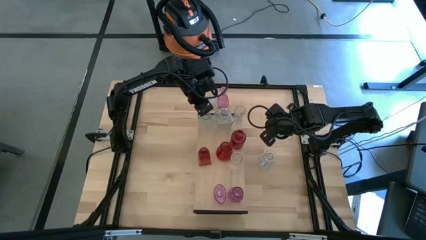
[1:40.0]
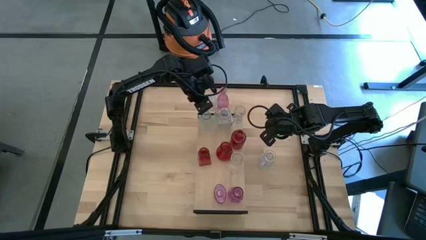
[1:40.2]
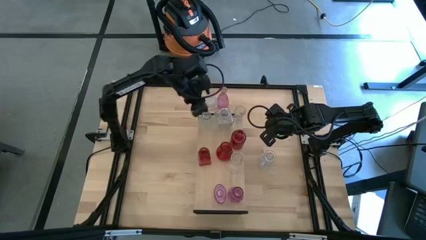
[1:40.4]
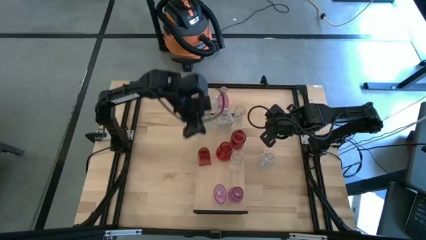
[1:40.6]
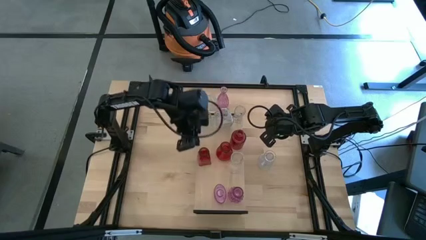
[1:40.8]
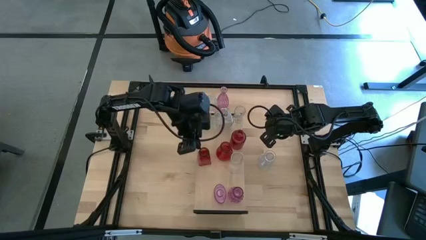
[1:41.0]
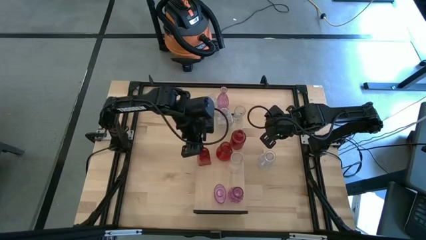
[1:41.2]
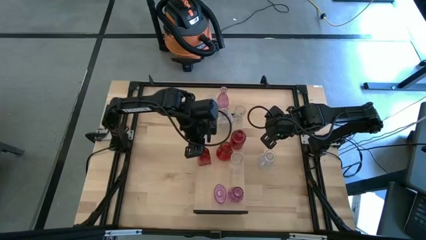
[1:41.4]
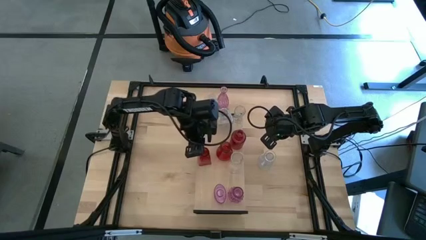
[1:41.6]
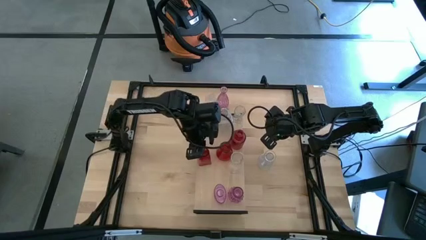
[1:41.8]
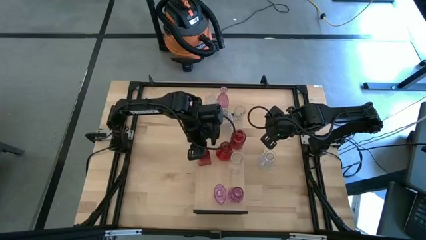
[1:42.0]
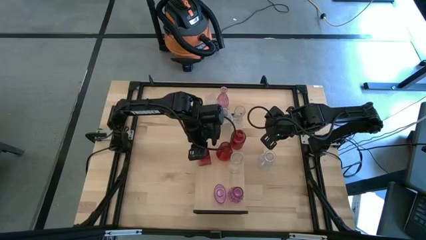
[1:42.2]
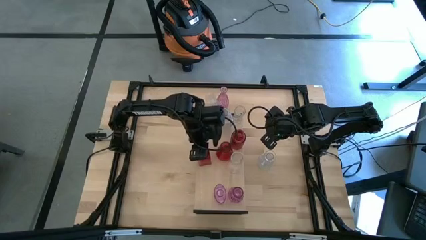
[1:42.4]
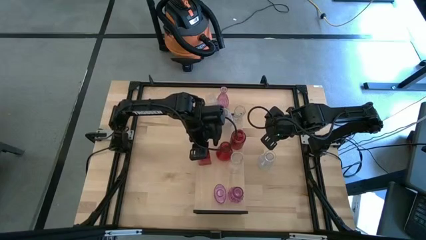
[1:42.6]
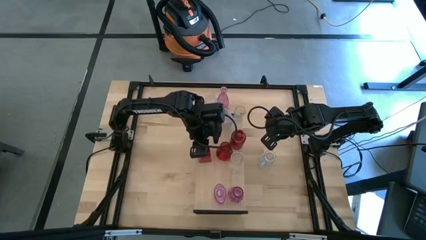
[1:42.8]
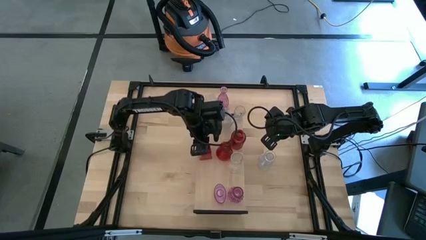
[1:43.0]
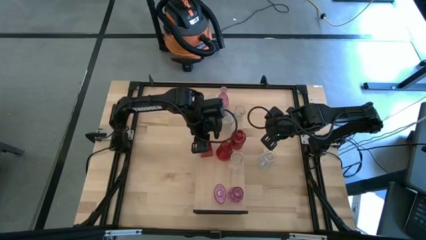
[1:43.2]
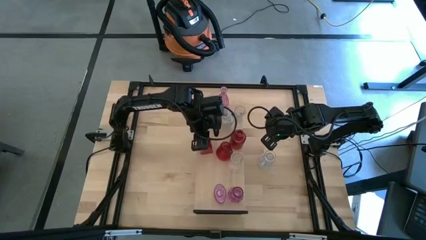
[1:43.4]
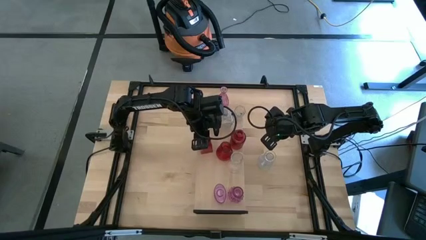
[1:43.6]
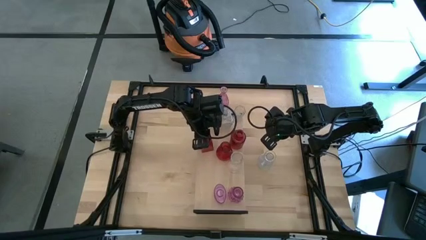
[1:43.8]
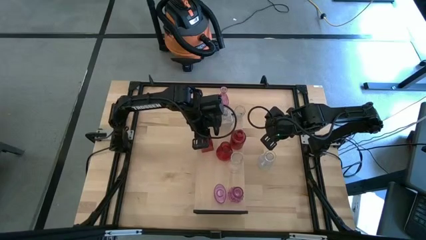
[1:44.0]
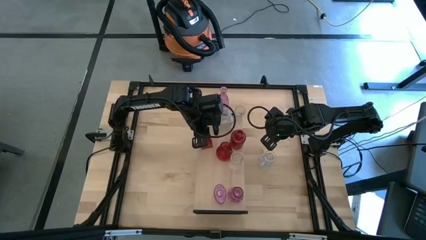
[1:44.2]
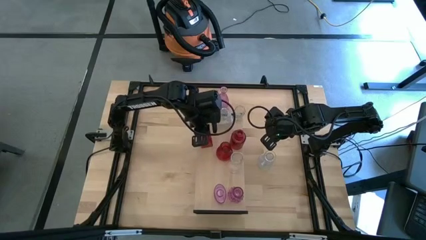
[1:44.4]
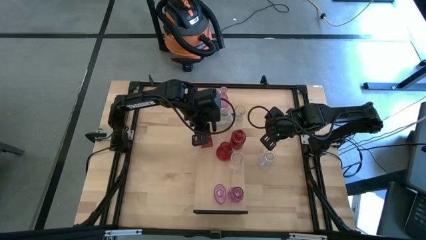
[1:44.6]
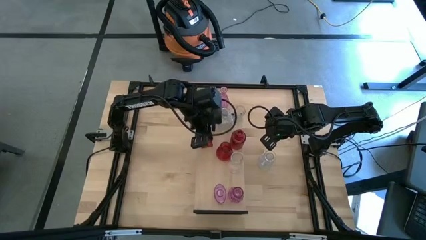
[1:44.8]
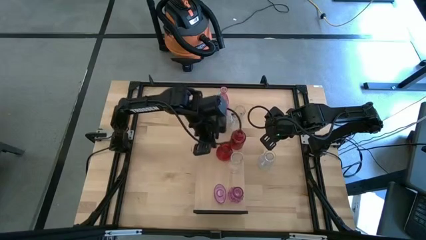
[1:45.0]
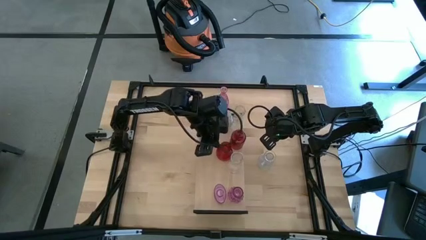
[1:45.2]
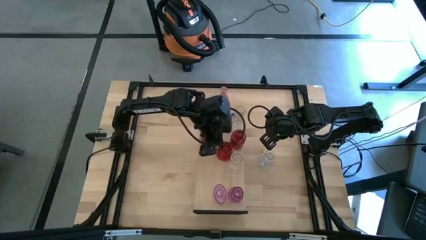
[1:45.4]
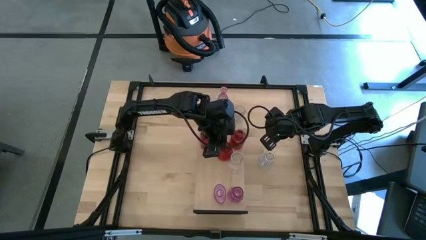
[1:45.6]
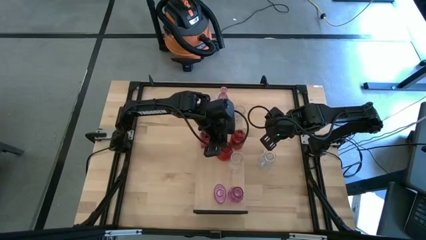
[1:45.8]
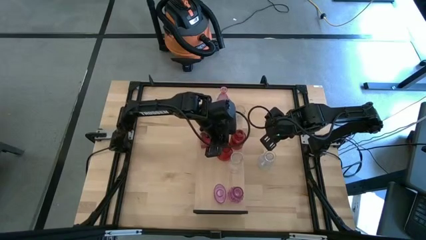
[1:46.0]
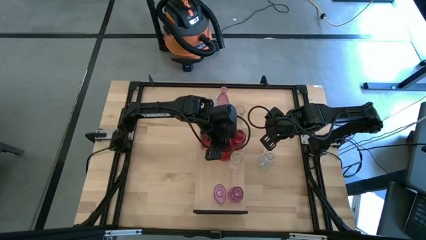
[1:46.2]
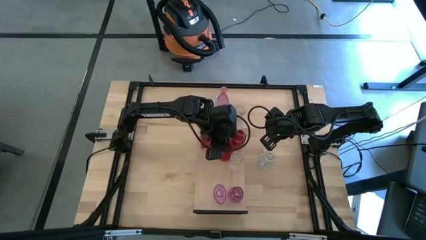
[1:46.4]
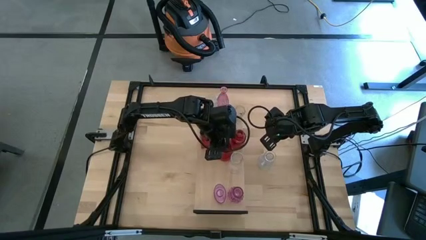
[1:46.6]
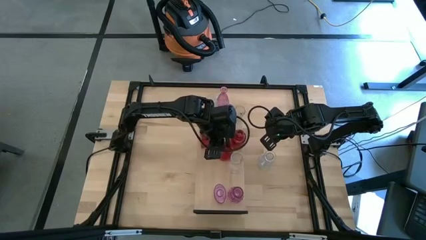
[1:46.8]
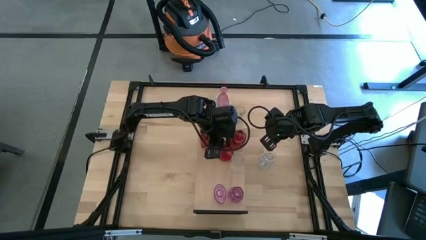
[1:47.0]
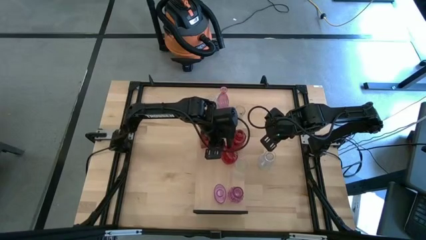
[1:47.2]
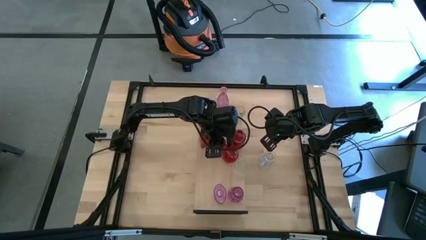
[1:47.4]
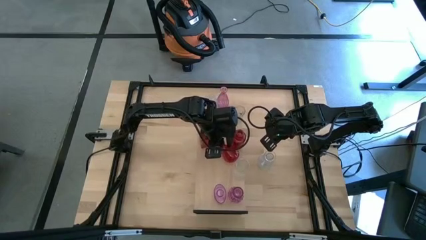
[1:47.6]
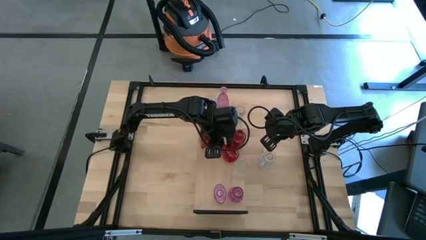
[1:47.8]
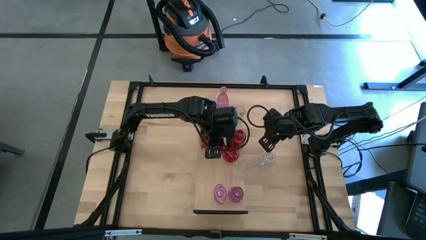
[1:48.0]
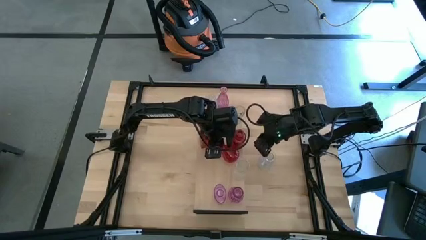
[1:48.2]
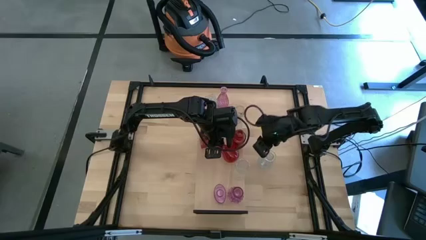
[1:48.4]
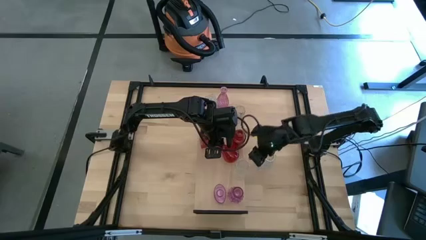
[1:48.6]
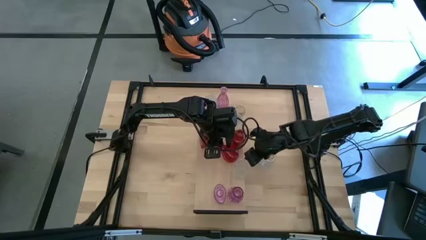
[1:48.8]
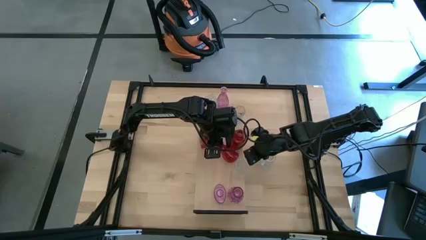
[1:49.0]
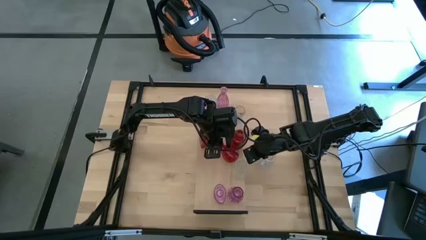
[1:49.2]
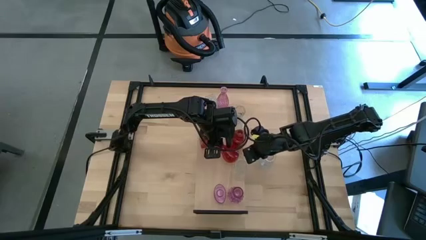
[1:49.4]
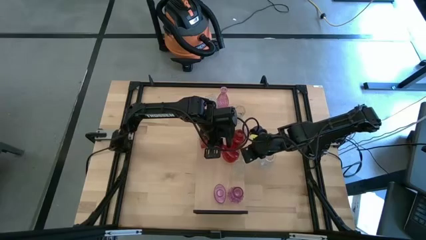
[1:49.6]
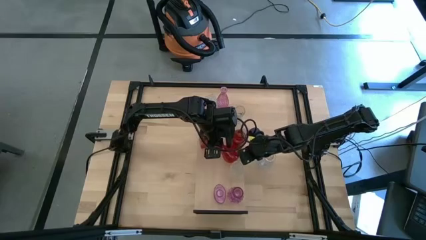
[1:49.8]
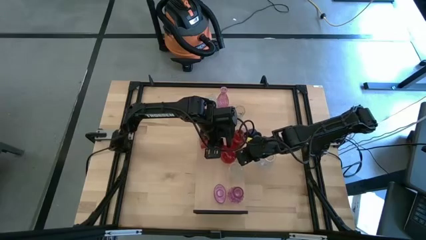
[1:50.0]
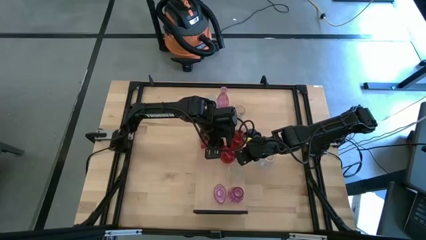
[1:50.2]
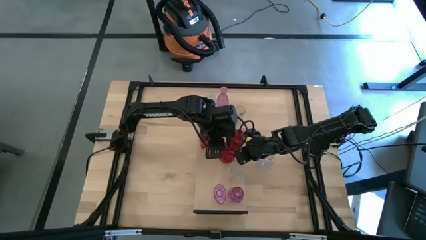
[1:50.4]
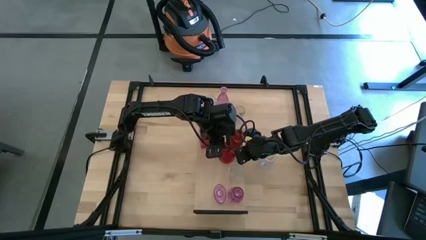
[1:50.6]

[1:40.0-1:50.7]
Task: sort vases onto shelf
Adjust the vases on the shelf

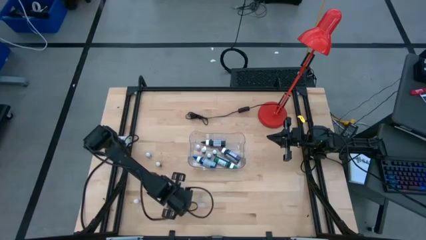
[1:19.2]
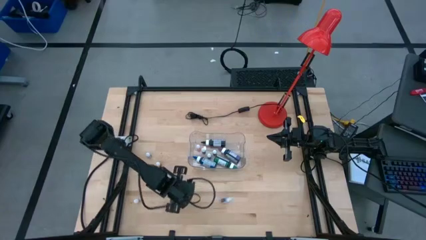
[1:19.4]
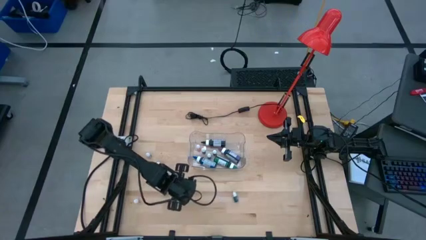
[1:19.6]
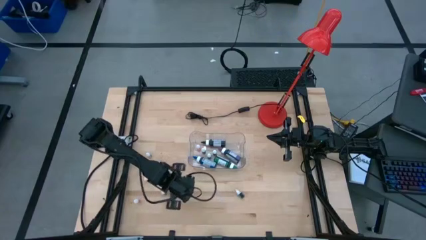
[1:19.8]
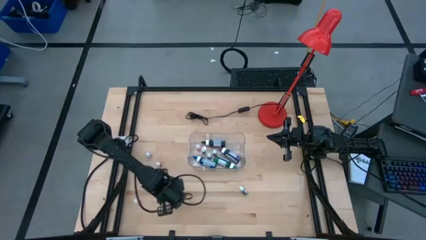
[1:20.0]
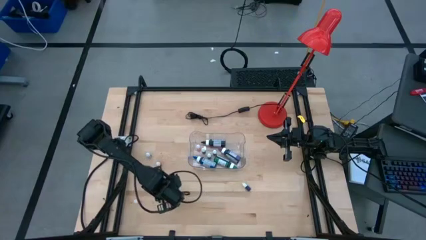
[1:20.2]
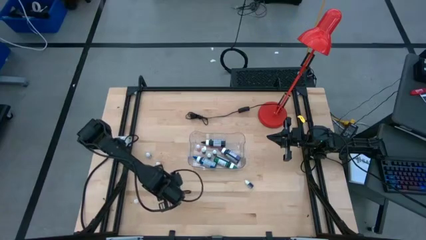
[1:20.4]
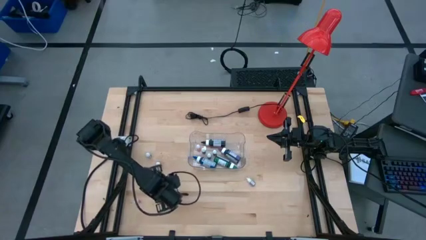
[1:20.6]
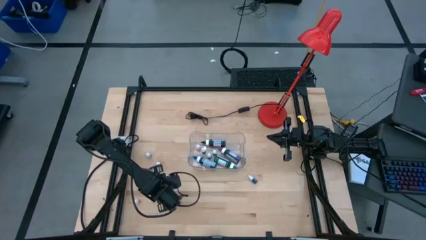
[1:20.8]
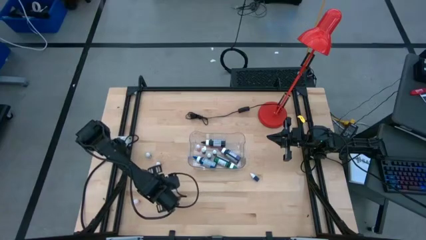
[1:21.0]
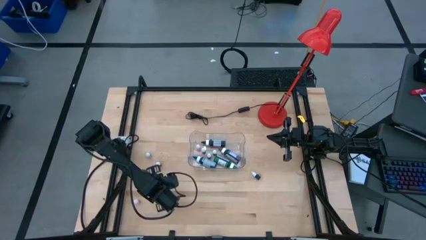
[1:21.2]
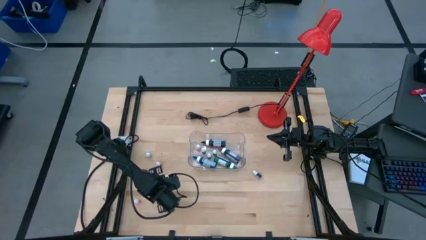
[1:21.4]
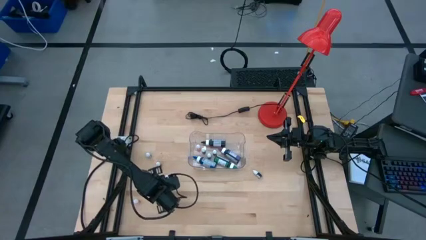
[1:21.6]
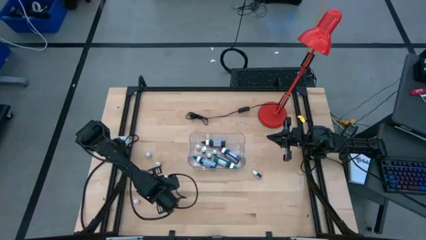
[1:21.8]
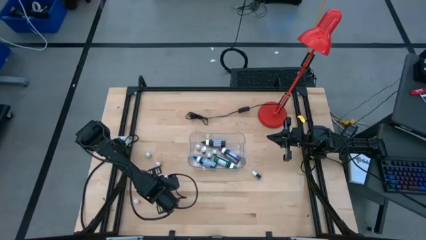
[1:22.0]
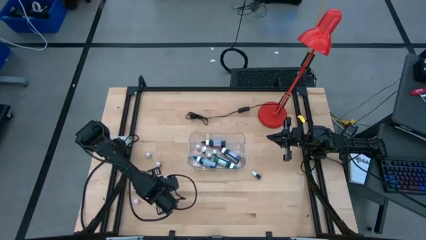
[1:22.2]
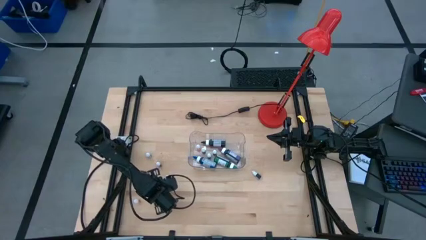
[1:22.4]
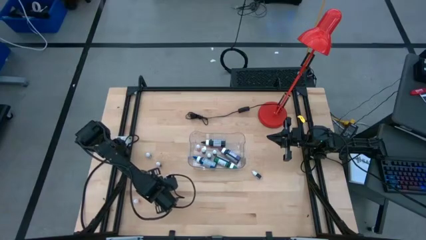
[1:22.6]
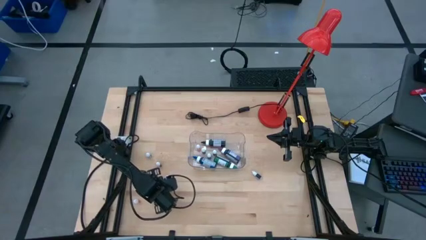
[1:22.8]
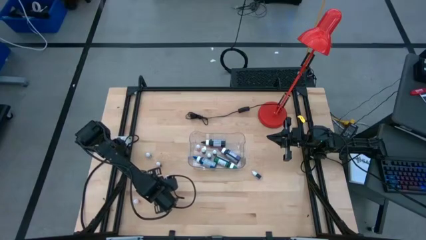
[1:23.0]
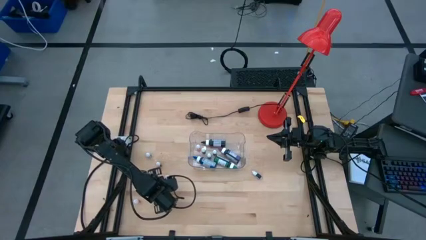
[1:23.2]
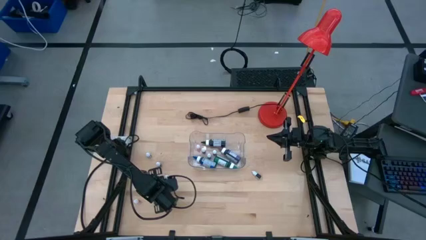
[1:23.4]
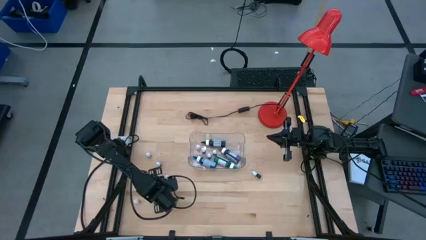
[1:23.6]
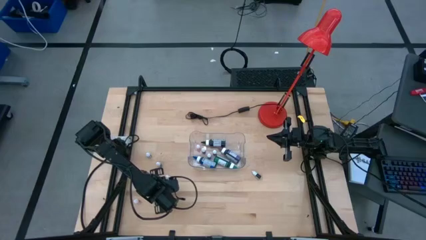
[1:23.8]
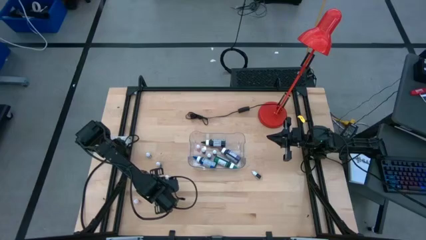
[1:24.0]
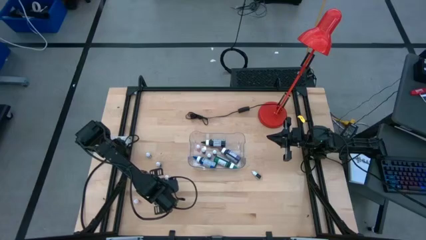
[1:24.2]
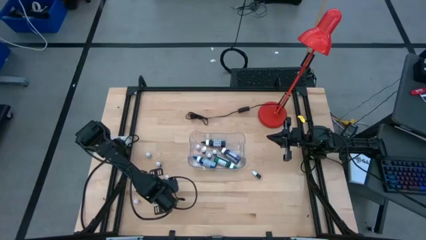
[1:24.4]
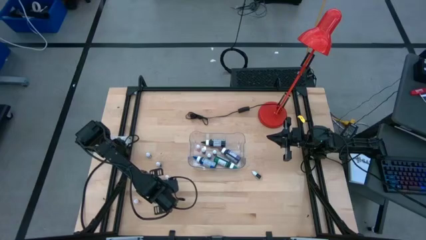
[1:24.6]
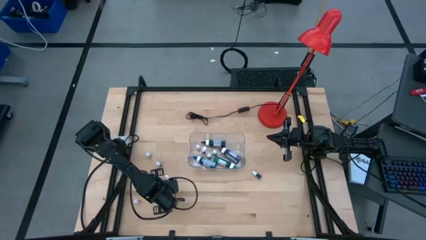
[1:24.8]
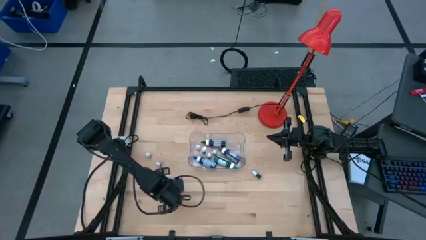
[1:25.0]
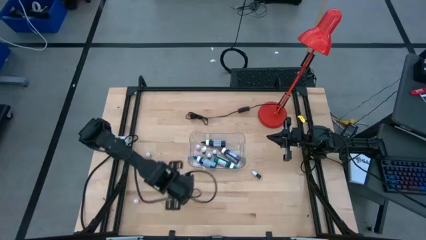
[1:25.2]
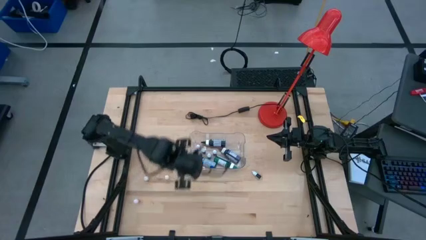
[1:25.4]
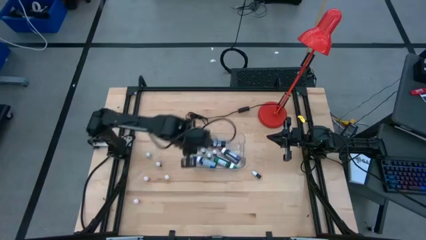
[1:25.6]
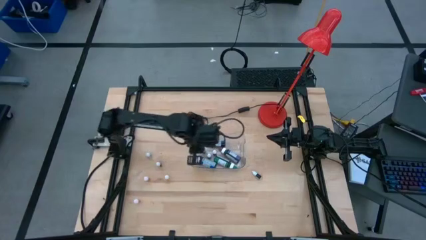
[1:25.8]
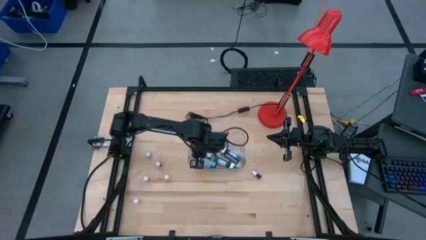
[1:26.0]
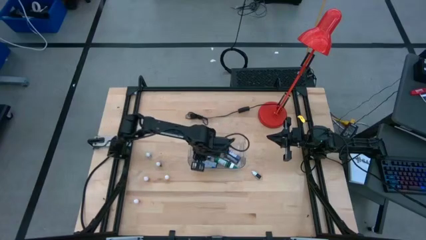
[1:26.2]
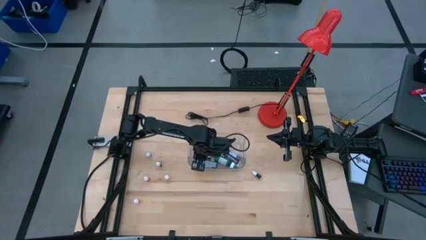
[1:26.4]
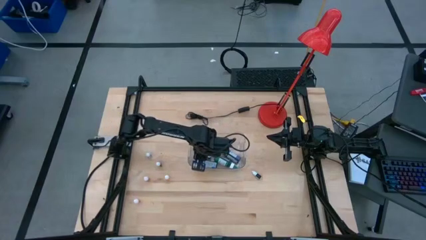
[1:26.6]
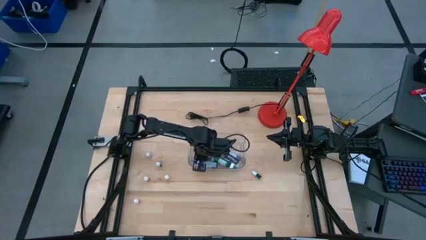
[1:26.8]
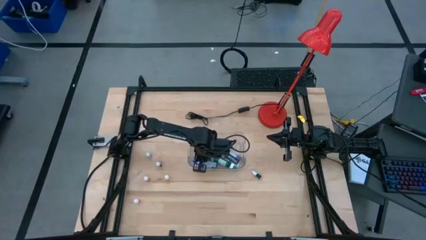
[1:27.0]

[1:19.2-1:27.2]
Task: Pick & Place food coloring
Put the small violet food coloring bottle into the transparent bin
